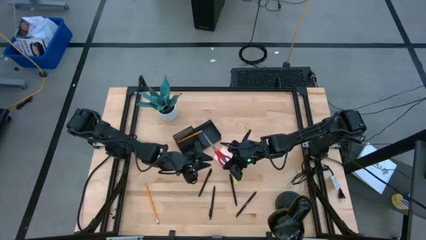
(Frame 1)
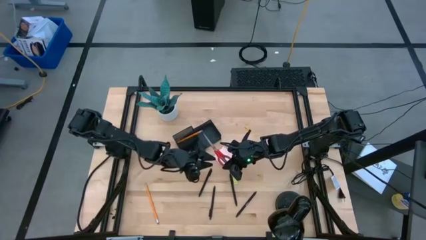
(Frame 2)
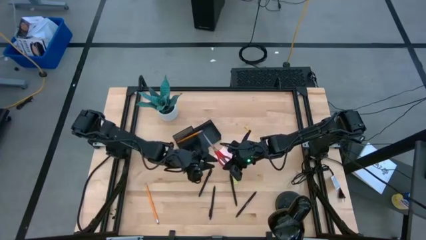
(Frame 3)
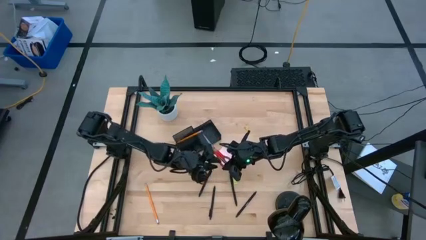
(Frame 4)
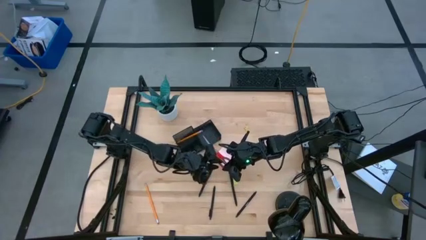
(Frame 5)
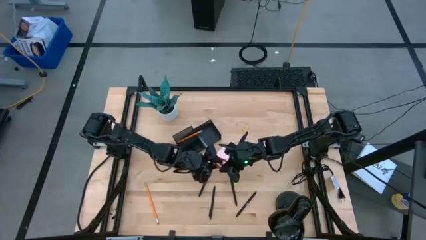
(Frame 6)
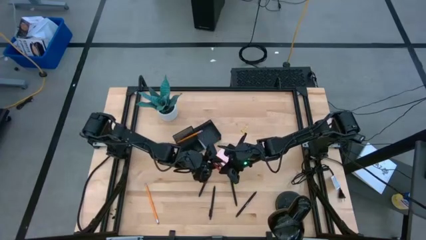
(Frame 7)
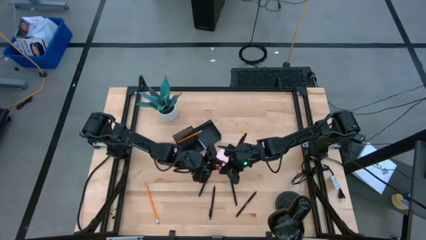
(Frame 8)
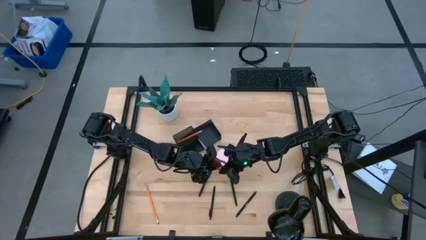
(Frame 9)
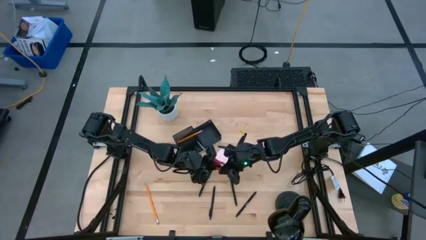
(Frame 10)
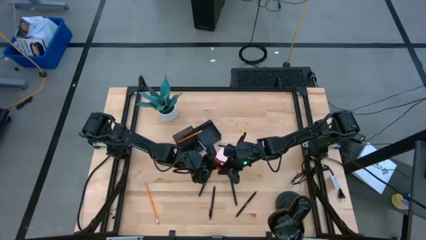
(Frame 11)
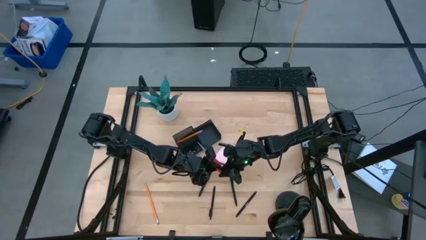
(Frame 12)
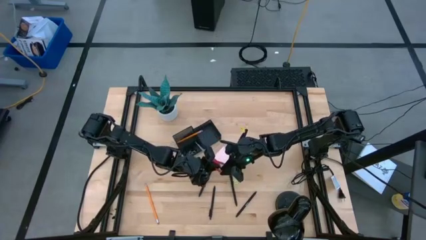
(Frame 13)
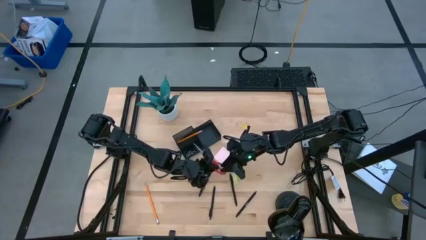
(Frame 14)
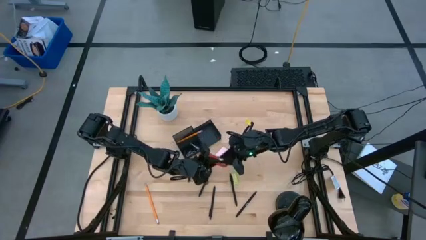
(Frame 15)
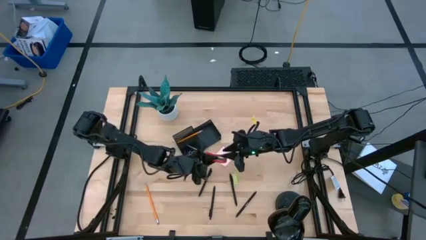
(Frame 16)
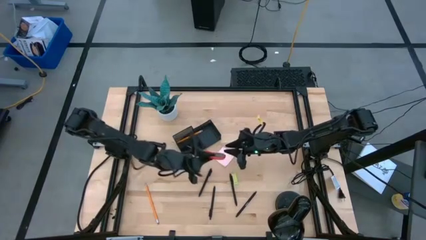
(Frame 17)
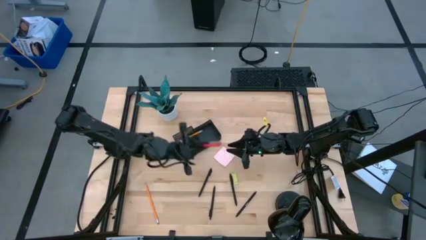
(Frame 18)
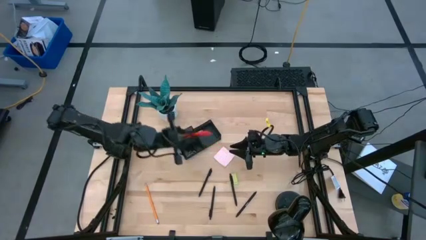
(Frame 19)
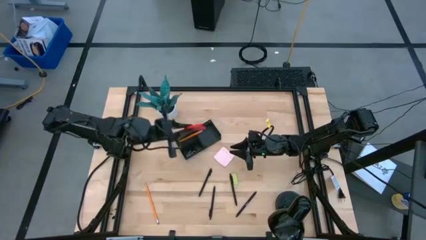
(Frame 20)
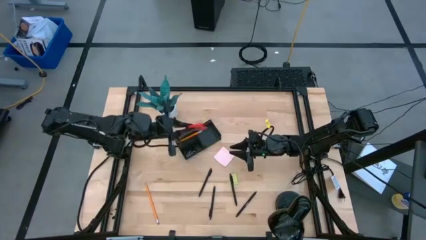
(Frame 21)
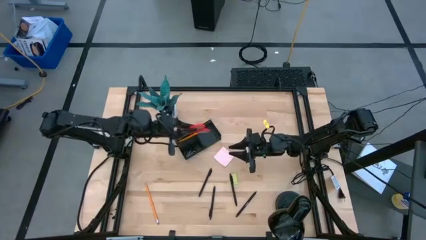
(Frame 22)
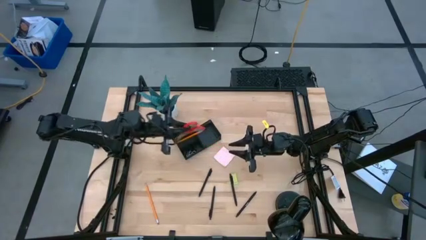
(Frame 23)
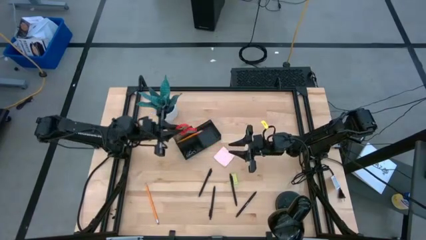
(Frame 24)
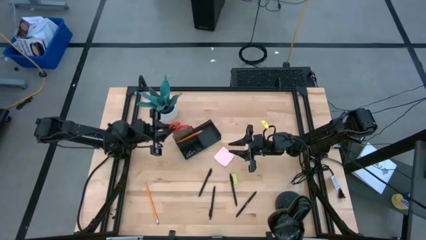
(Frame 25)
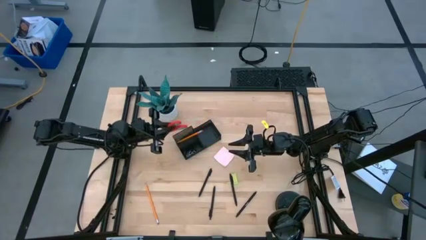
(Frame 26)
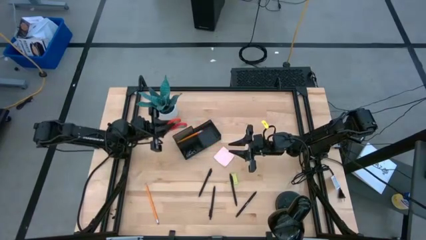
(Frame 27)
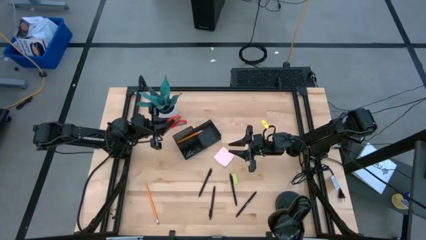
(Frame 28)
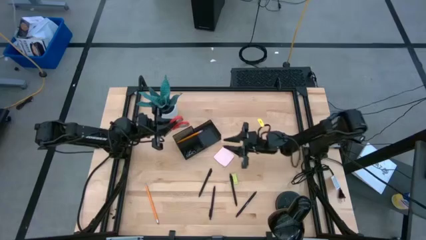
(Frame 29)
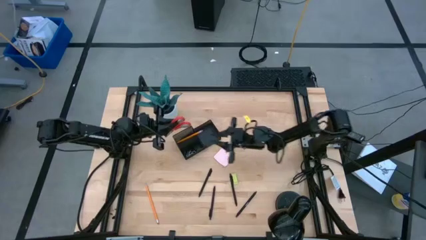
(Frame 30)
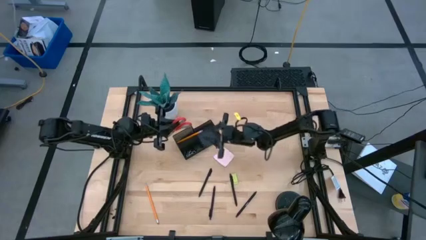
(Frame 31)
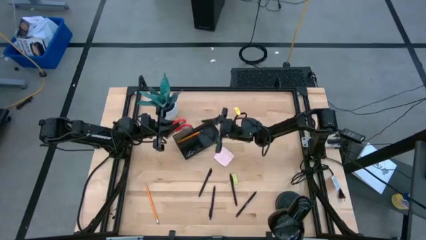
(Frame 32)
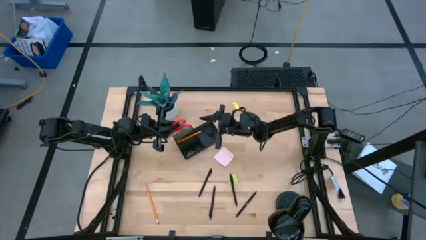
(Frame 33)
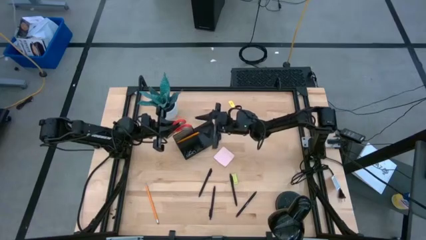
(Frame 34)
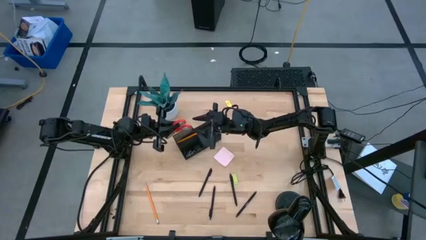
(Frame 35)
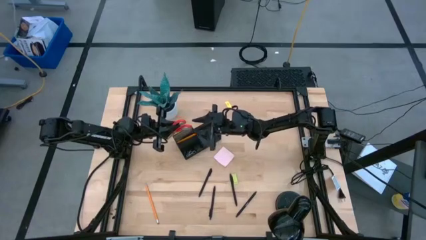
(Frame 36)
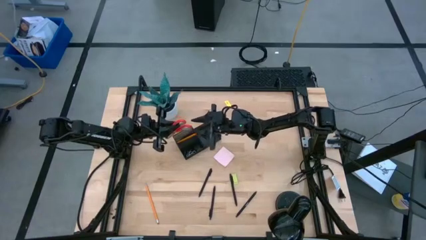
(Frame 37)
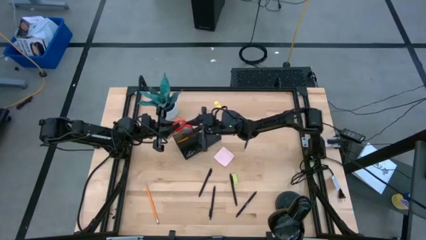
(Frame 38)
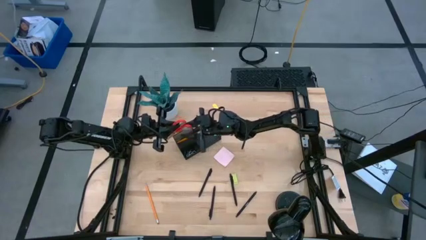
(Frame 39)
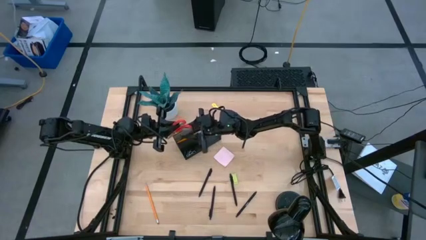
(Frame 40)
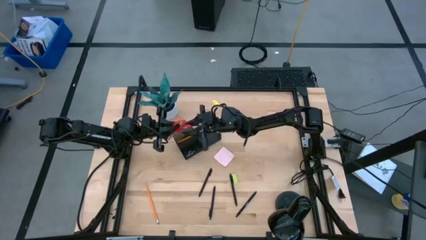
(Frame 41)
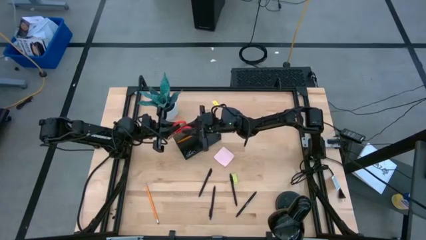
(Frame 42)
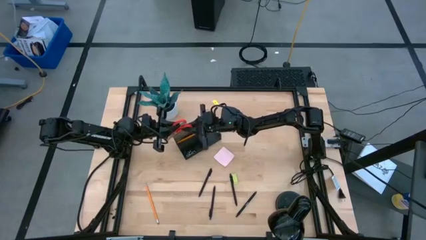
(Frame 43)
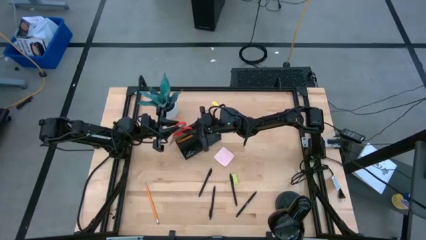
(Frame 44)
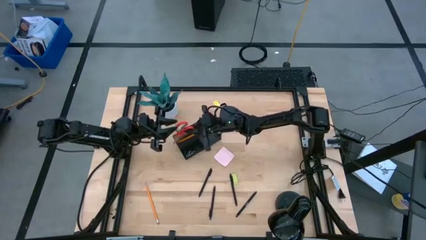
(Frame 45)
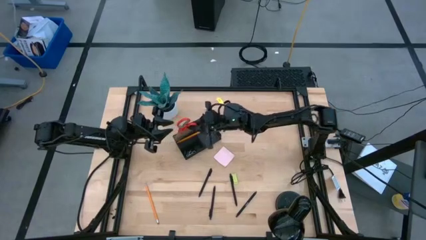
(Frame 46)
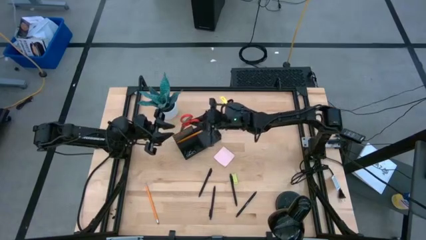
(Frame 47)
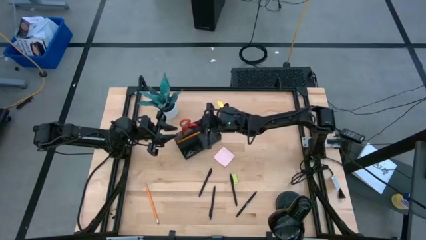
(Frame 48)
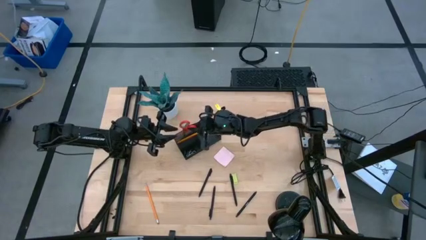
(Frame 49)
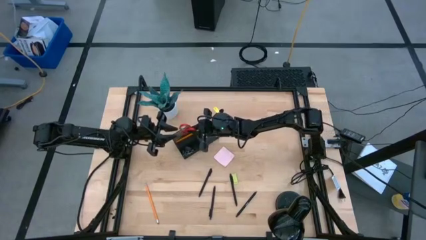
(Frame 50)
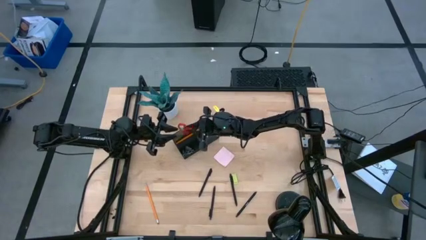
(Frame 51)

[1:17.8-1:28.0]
Task: Pick and place office supplies into organizer
Put the red scissors into the black desk organizer

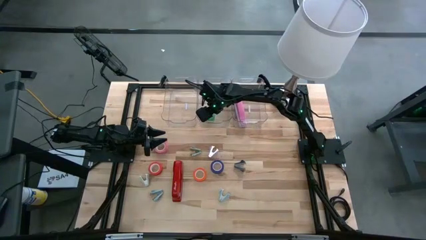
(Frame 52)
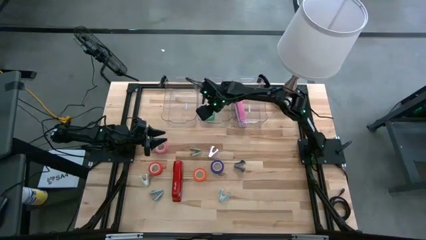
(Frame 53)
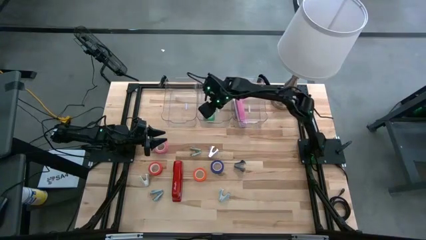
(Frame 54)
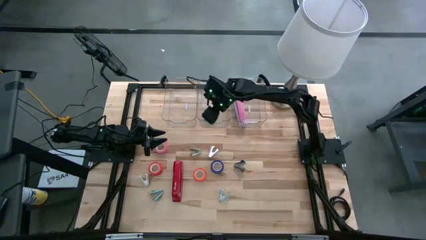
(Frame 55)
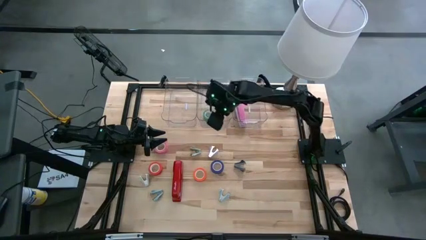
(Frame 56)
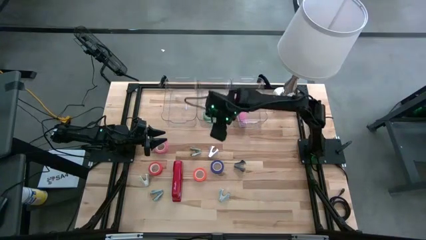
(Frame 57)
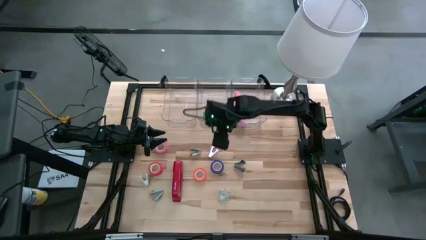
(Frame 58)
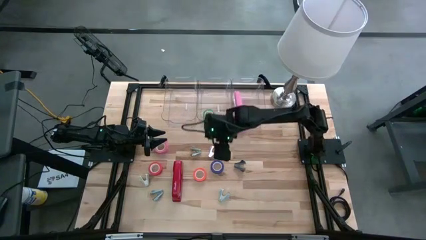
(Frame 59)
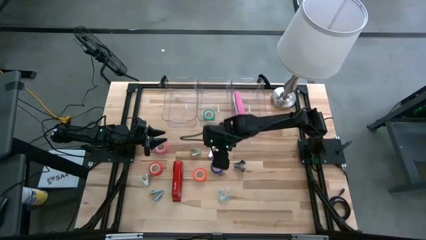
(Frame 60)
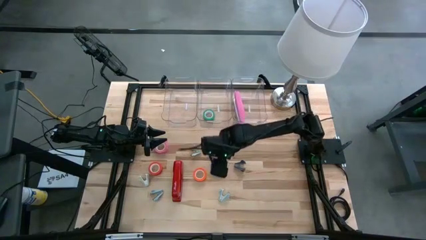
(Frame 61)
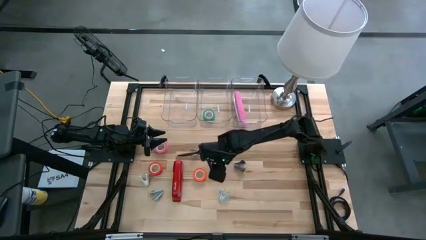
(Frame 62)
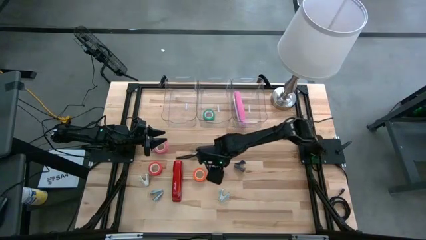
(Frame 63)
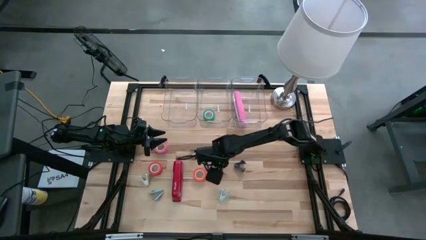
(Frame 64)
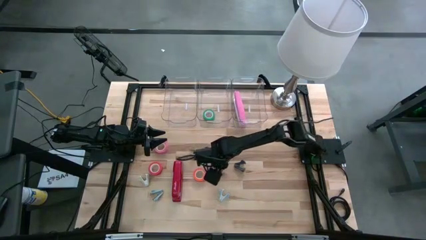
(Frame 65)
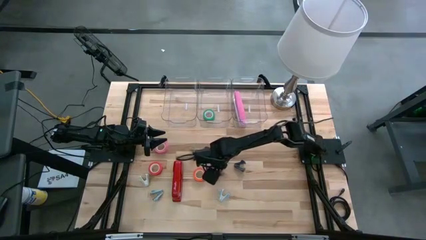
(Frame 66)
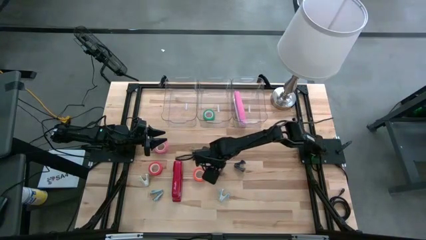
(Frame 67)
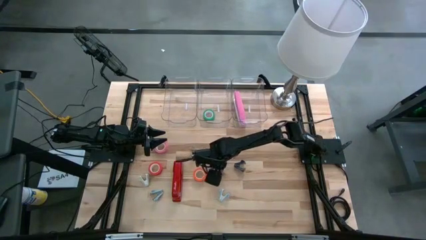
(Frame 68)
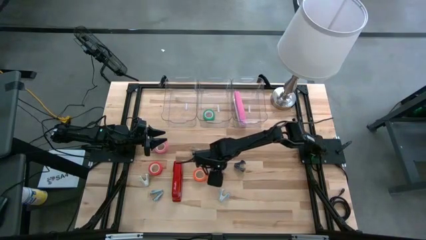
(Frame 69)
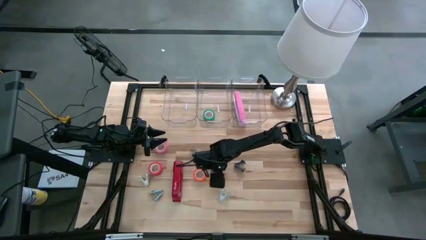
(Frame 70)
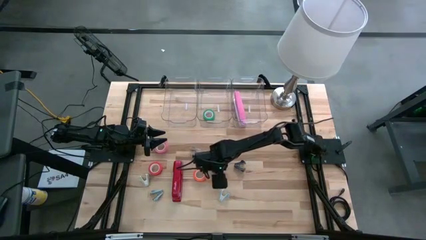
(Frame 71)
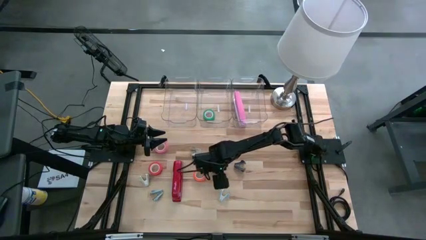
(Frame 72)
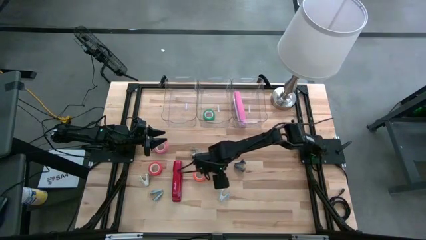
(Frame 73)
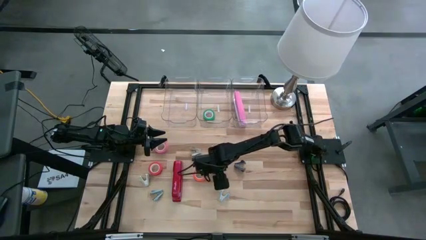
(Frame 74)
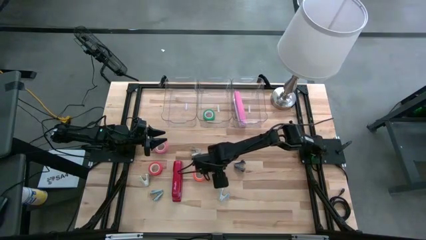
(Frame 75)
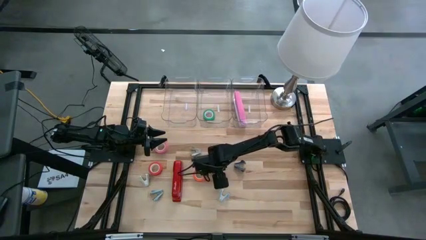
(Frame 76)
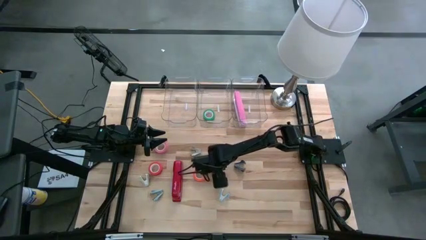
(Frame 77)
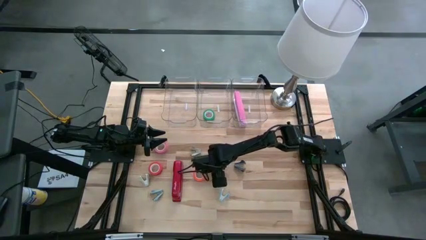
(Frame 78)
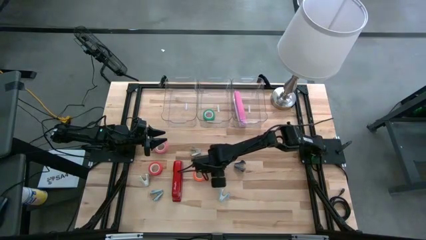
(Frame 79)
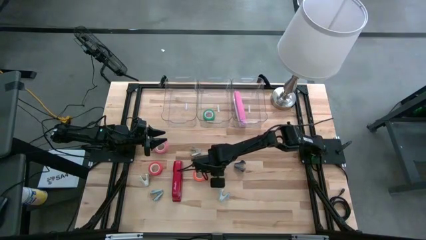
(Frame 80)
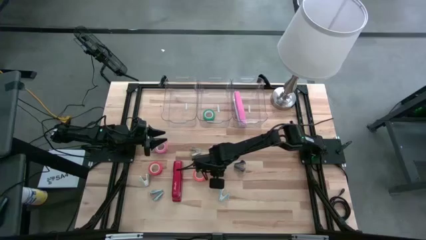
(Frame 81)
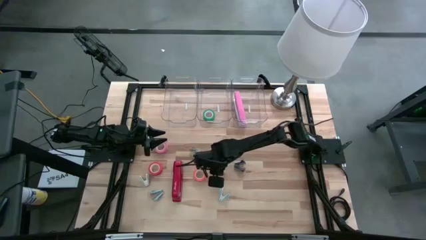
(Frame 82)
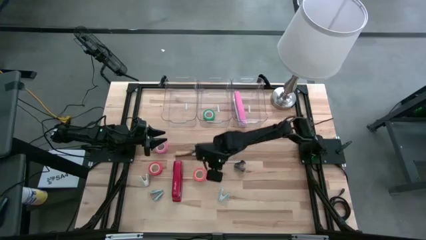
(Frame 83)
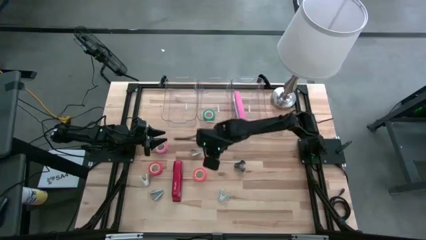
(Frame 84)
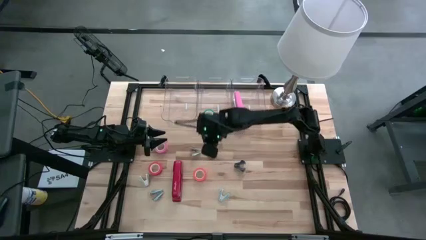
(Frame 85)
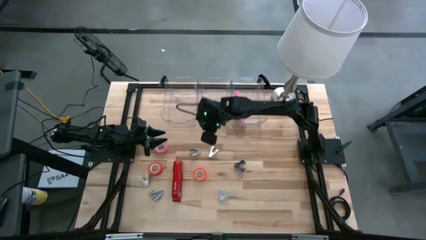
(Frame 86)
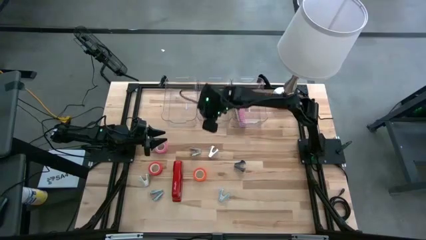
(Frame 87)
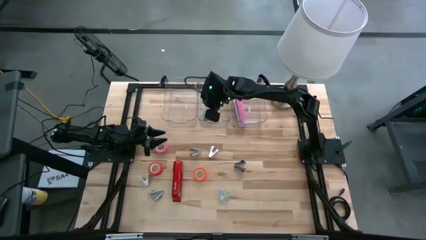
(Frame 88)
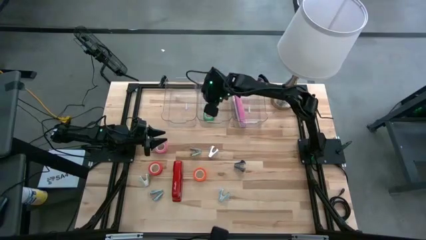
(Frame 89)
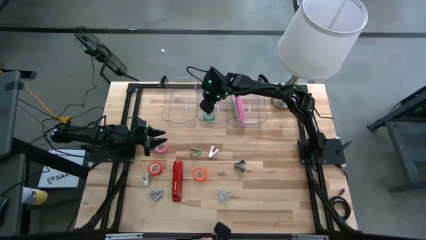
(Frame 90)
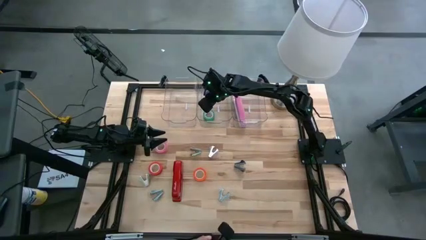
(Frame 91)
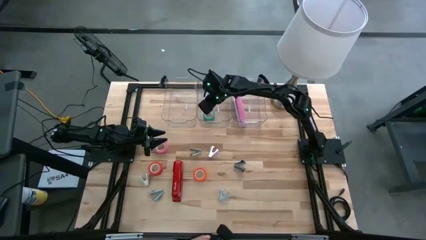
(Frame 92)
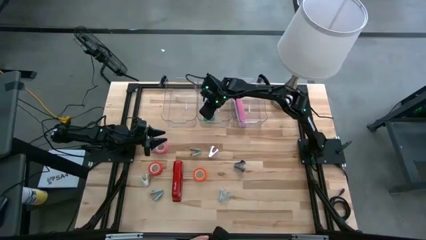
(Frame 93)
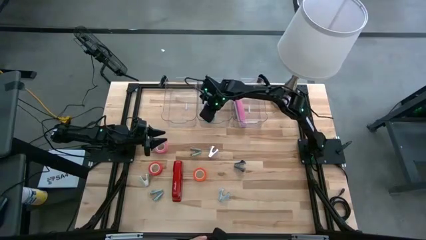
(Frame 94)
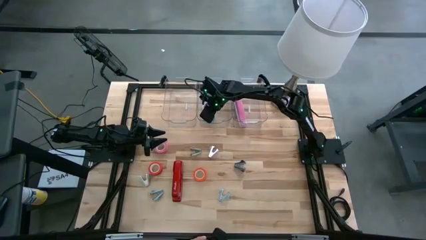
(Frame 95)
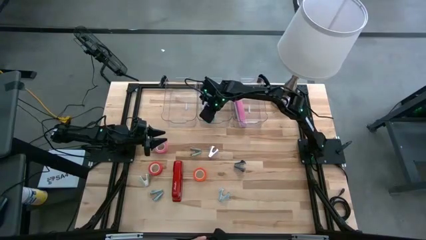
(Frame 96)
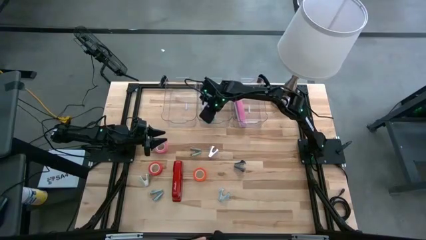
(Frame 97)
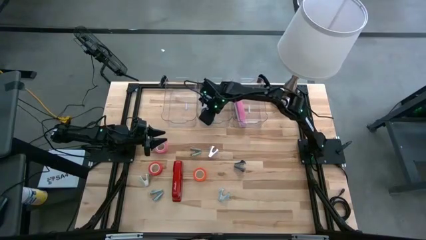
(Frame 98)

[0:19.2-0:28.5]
Task: Pick and place Stapler, Stapler remover, tape
Put the blue tape into the middle transparent bin
